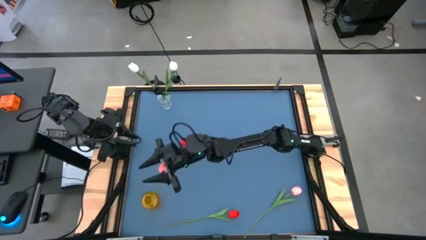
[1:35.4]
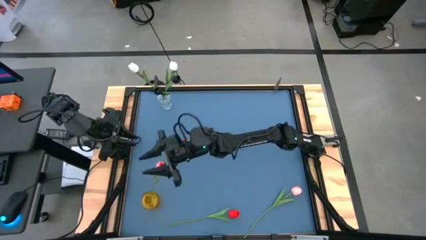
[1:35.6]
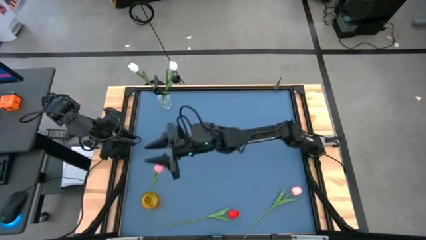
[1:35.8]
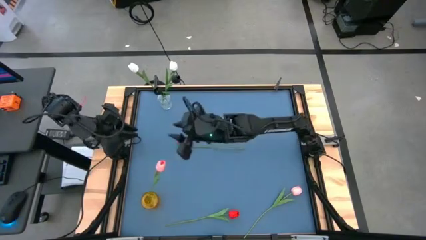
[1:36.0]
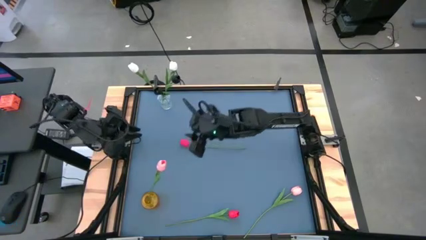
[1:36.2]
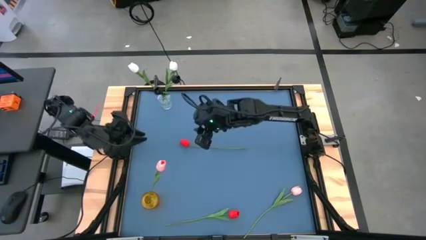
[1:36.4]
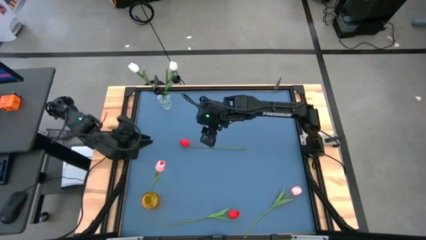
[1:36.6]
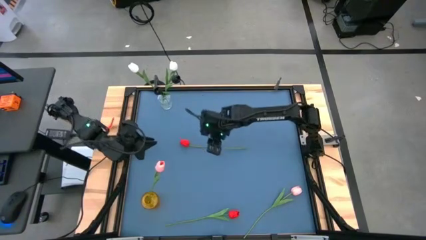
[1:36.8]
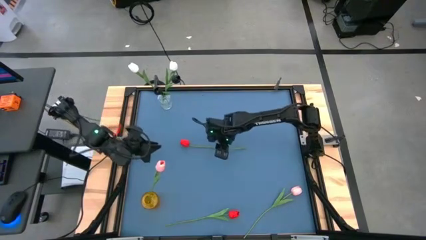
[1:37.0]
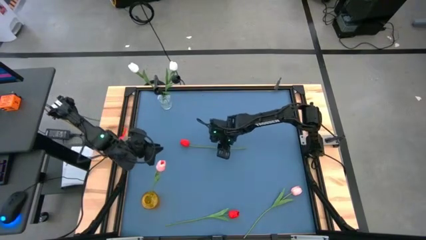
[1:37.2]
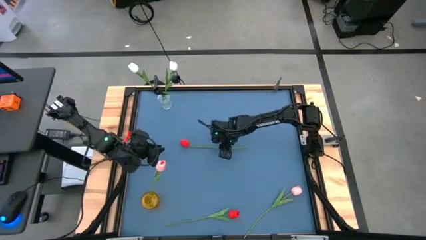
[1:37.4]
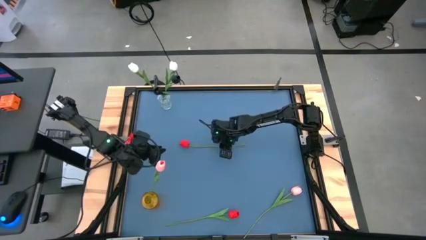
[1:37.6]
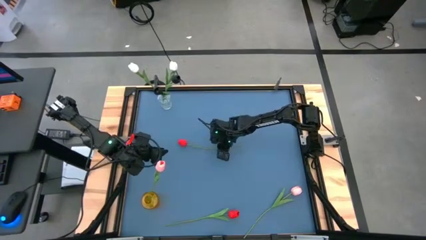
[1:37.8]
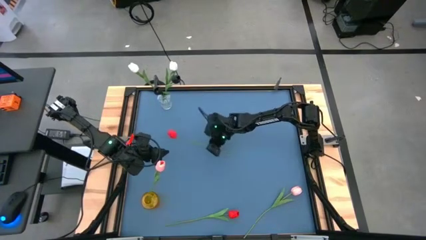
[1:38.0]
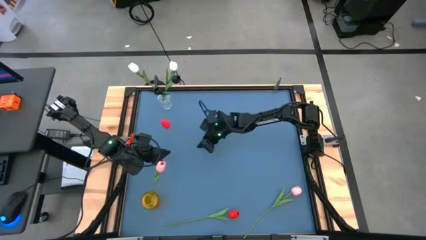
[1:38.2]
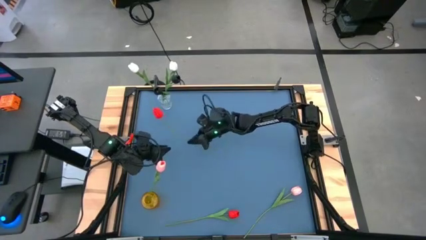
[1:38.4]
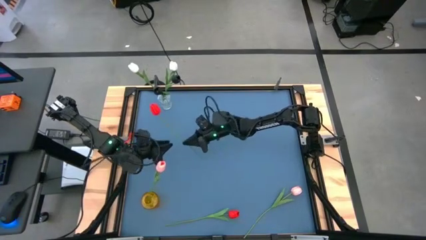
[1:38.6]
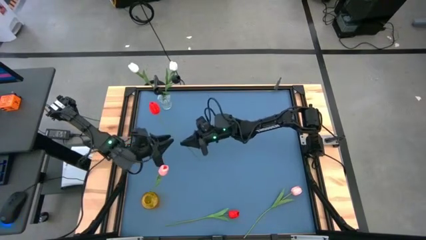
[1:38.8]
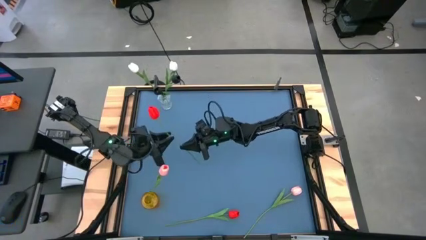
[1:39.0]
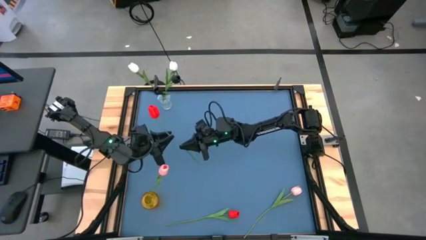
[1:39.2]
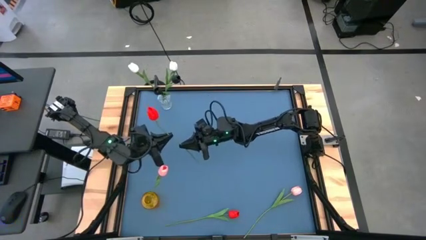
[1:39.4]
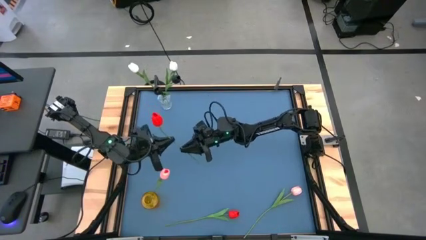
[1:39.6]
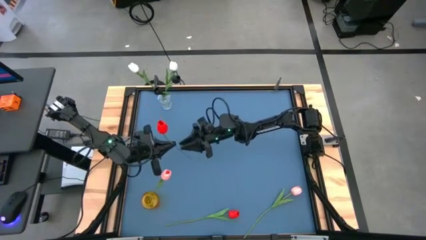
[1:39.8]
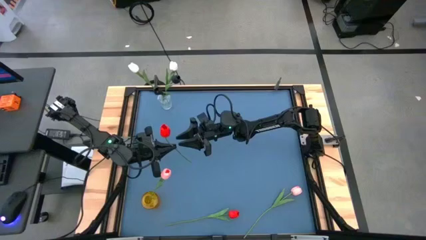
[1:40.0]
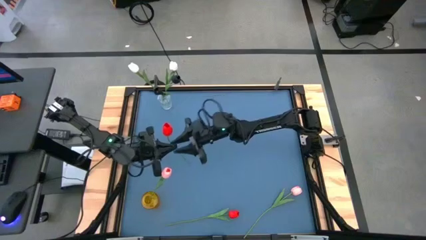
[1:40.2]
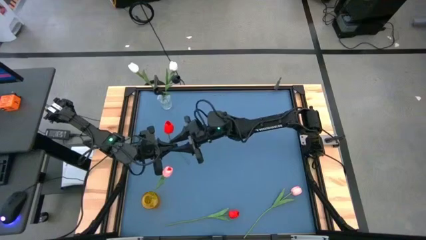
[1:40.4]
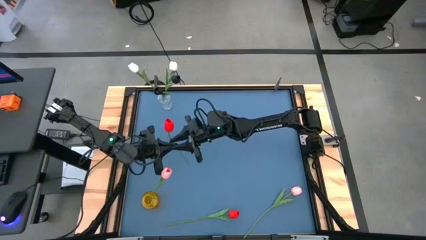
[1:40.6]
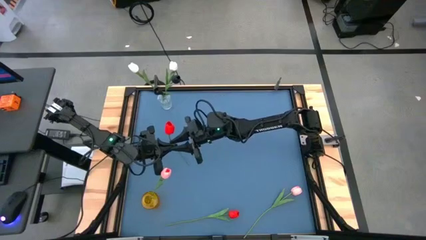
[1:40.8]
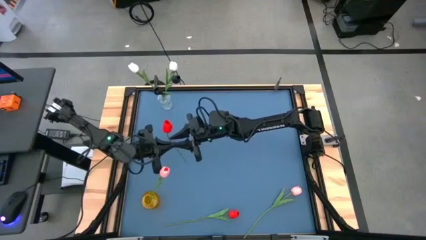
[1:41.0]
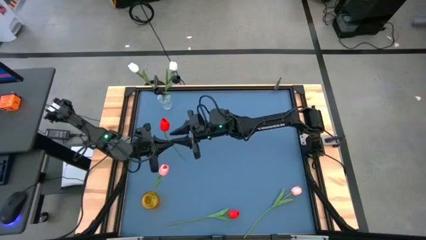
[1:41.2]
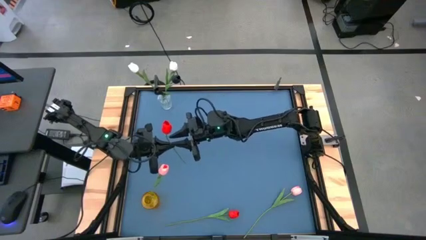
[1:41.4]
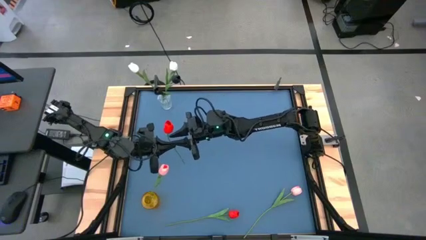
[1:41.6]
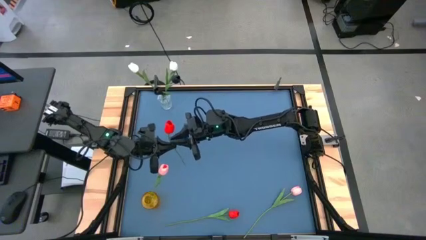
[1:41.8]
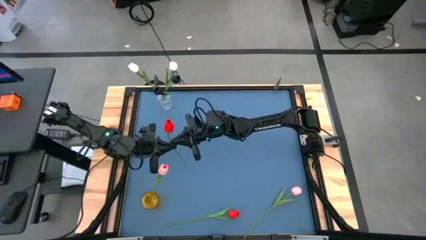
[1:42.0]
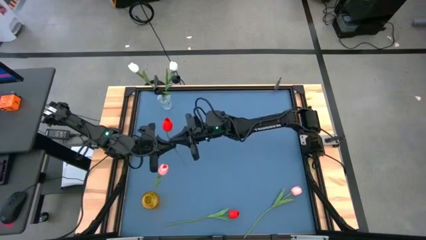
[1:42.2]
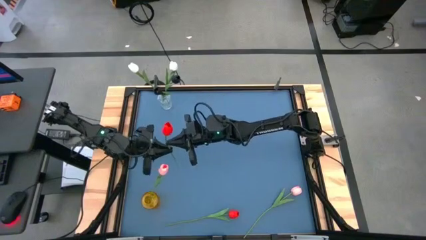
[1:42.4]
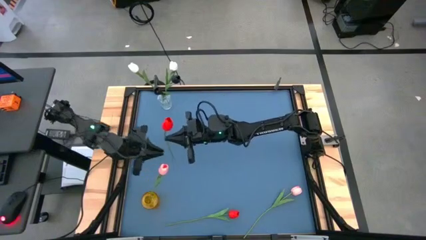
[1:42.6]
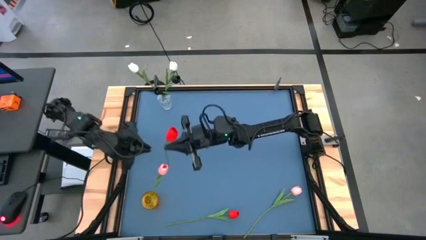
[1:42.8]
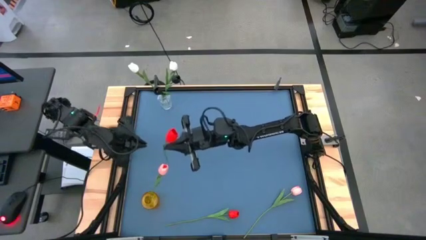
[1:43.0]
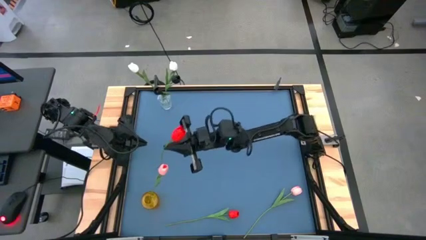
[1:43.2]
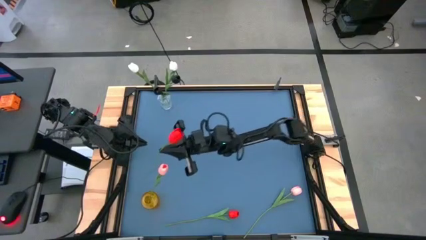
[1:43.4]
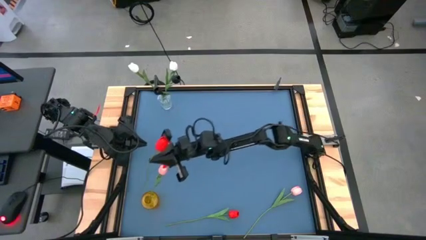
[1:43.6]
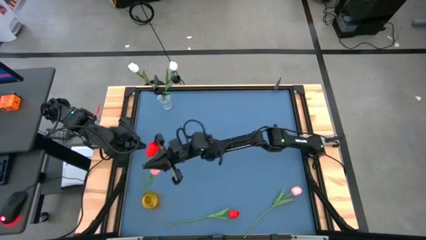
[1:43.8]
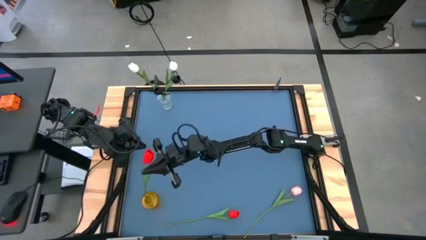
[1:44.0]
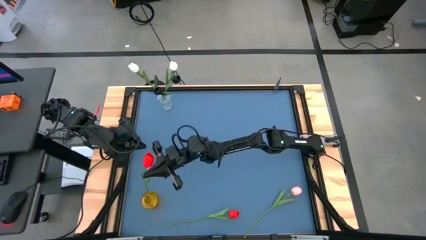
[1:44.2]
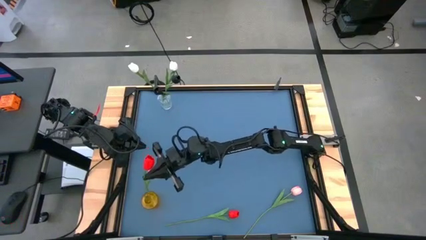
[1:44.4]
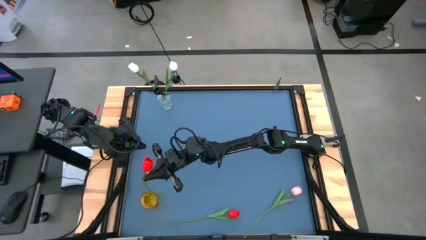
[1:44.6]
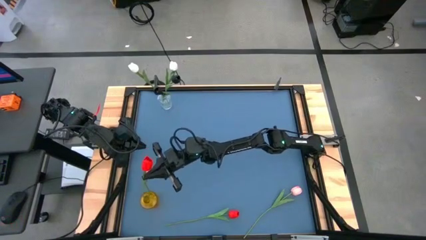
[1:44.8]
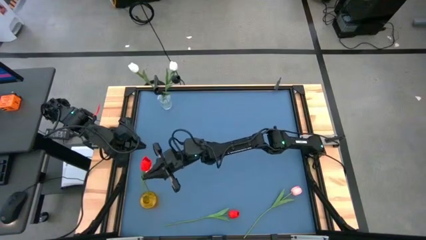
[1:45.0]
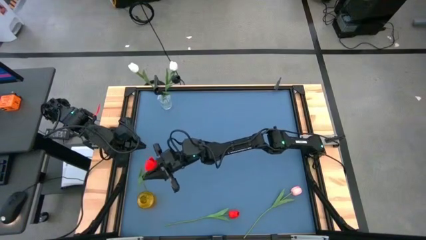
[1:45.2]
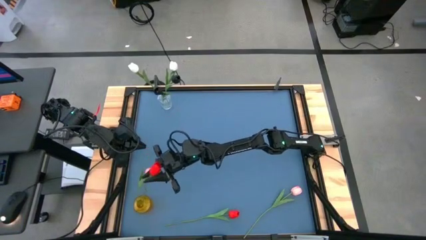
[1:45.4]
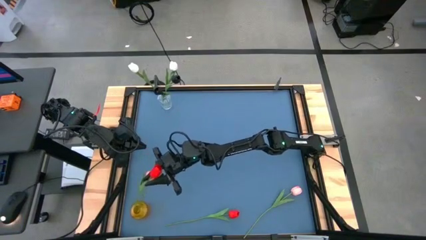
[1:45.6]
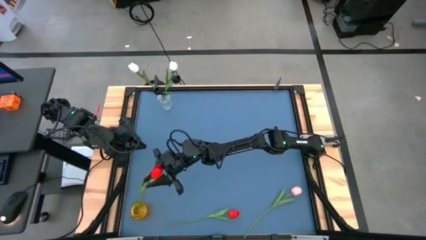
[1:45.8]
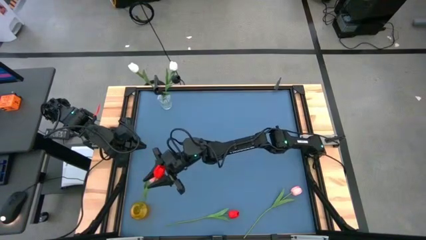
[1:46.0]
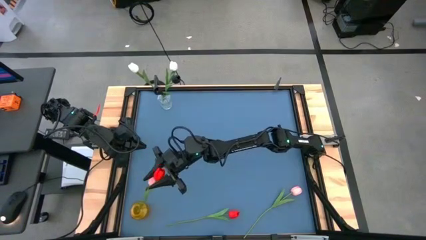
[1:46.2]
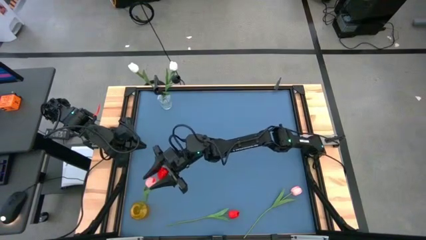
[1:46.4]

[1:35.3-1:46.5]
Task: Sort flowers into vase by color
Put the top red tulip into the yellow vase

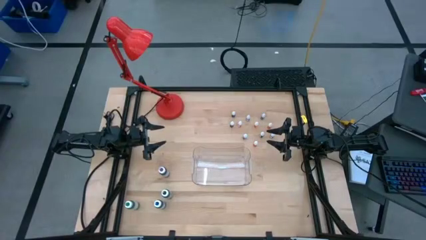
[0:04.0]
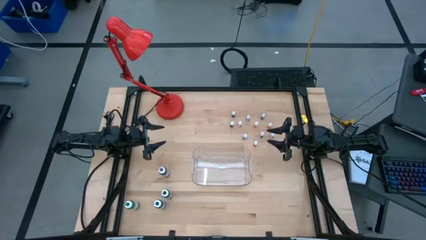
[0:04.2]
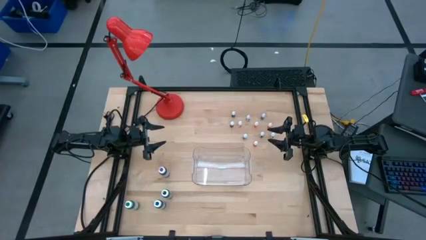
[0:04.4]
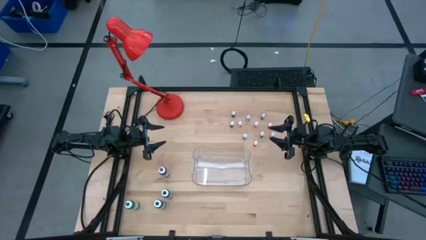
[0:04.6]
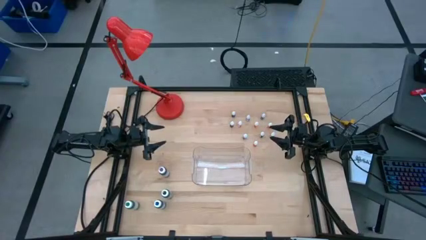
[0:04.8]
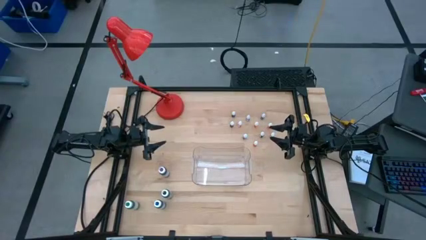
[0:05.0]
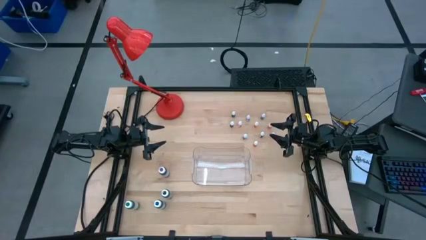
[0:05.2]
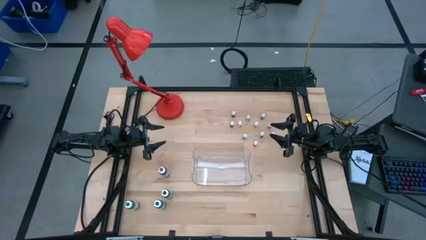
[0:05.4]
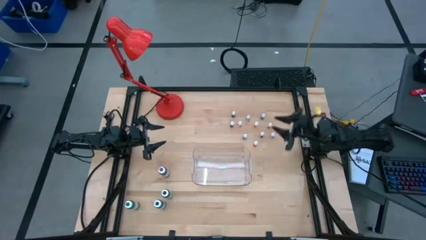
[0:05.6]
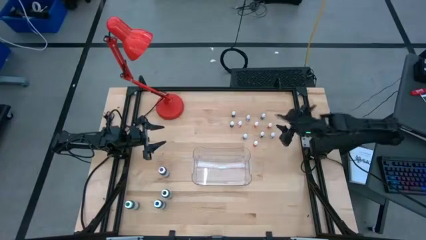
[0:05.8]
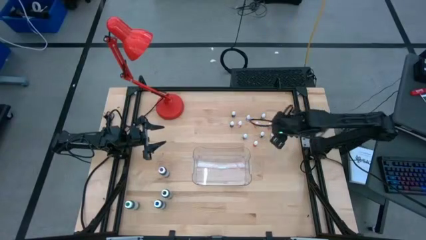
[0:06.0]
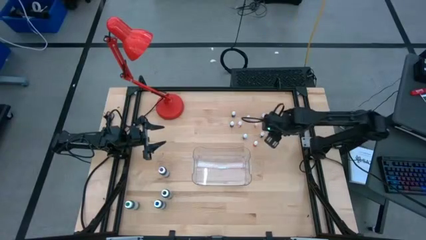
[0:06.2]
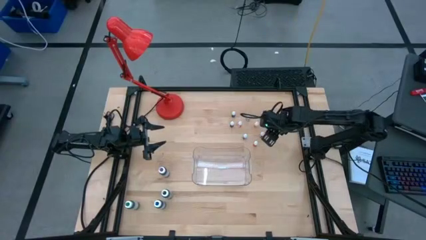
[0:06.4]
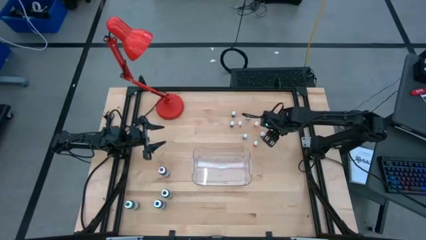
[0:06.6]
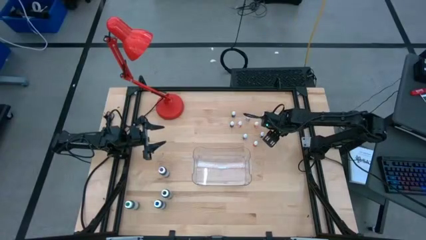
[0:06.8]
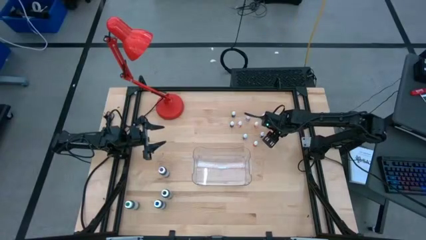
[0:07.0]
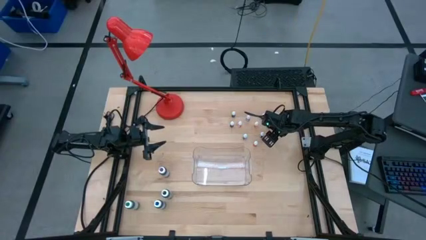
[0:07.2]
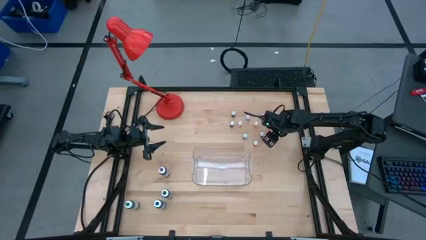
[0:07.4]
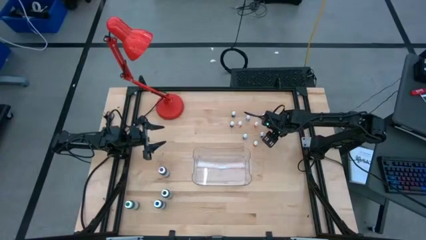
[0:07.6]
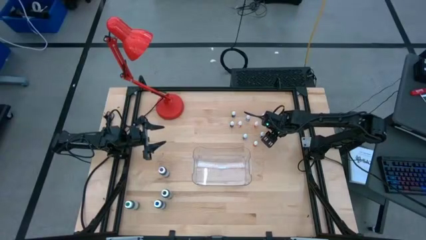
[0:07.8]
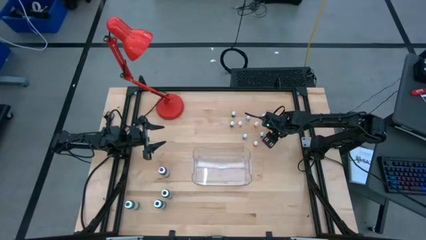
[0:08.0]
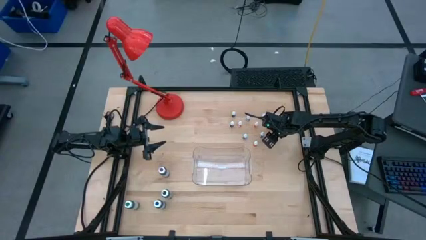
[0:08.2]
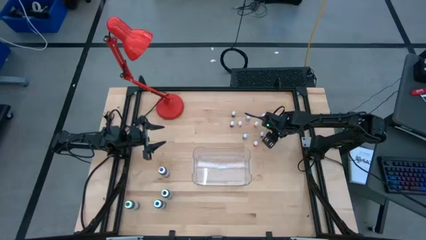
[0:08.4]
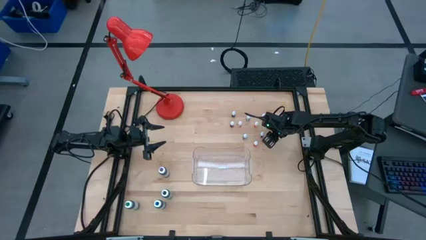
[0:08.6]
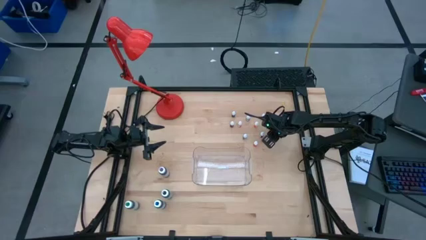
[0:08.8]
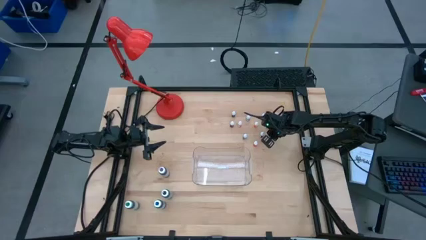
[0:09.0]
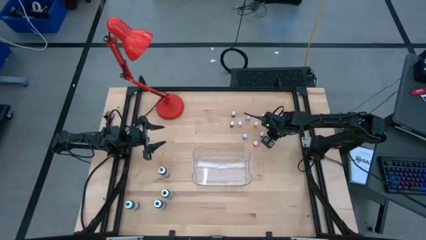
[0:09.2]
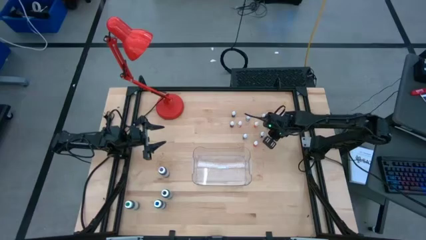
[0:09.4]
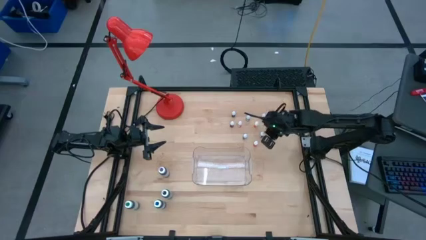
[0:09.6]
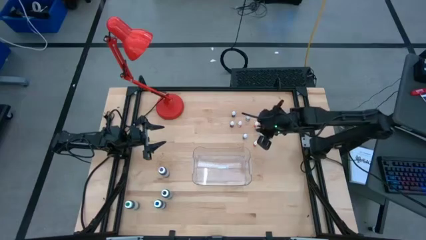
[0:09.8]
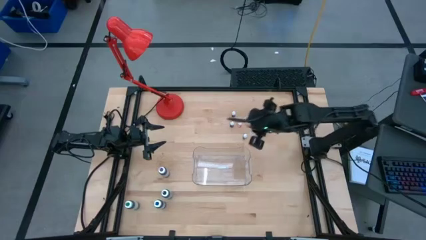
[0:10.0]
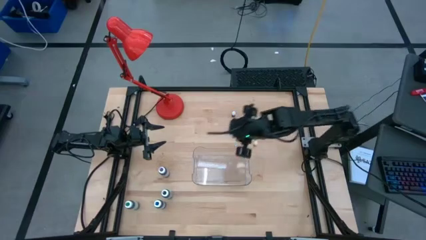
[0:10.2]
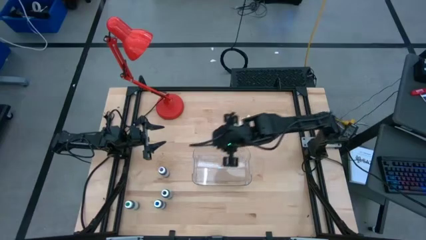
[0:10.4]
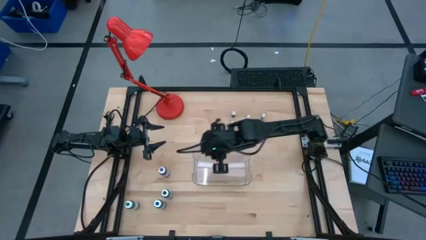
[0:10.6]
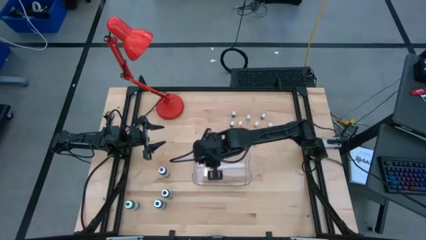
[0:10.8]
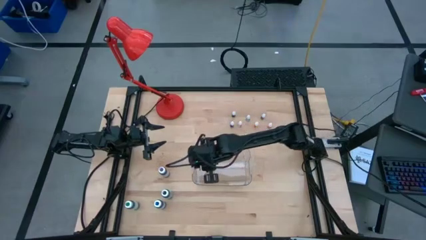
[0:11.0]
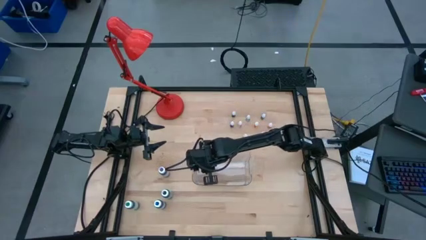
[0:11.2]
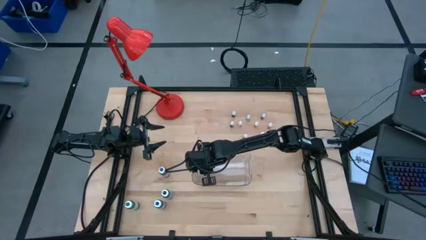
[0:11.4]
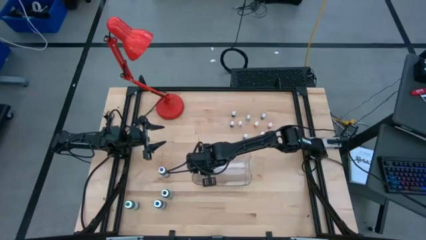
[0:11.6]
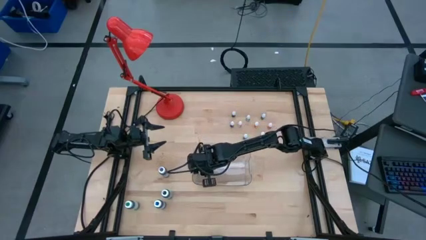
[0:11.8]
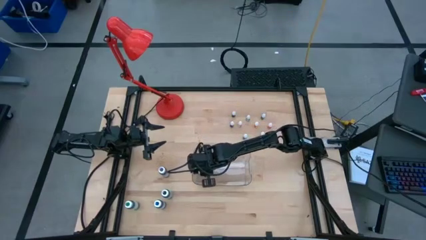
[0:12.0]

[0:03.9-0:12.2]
Task: Pick & Place food coloring
Put the red food coloring bottle into the transparent bin
